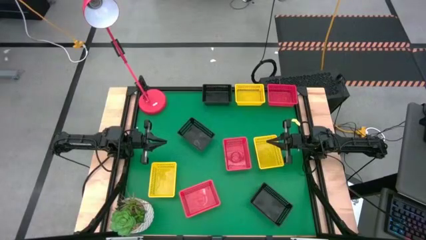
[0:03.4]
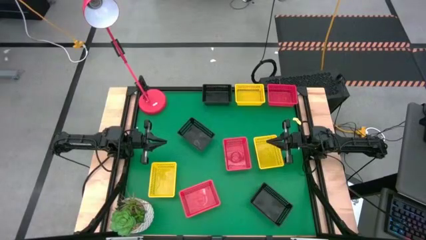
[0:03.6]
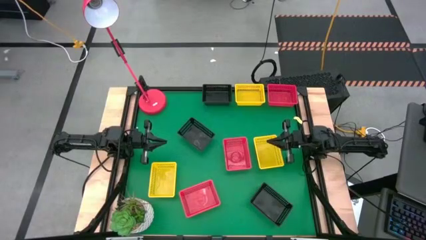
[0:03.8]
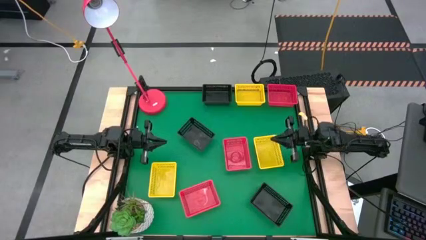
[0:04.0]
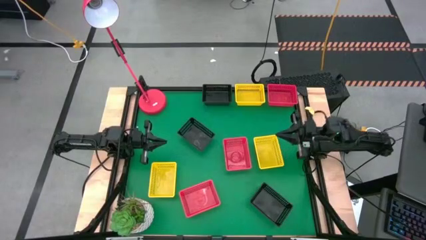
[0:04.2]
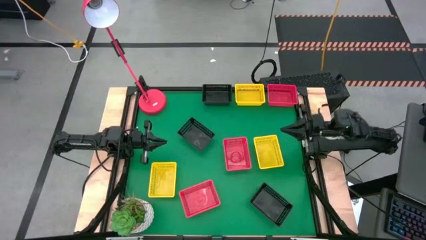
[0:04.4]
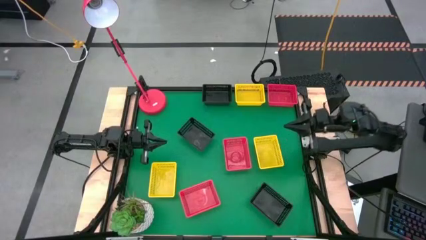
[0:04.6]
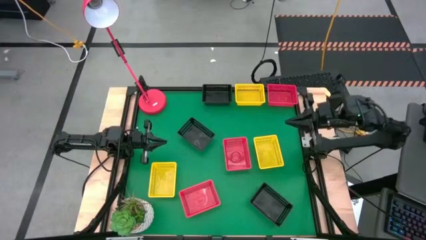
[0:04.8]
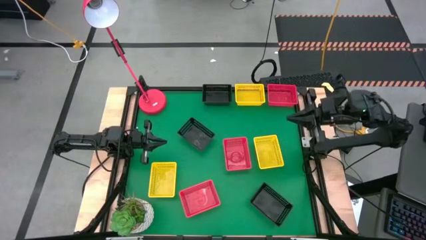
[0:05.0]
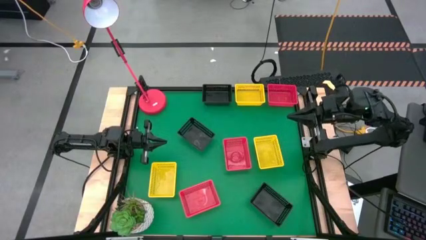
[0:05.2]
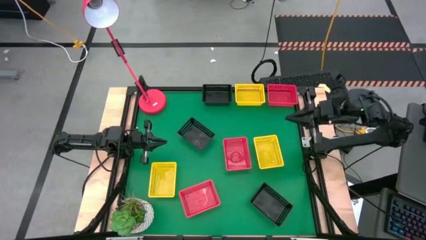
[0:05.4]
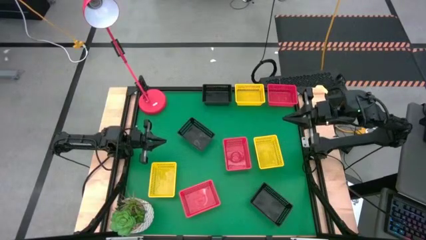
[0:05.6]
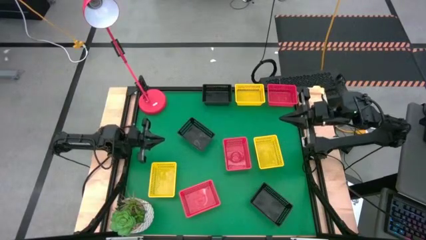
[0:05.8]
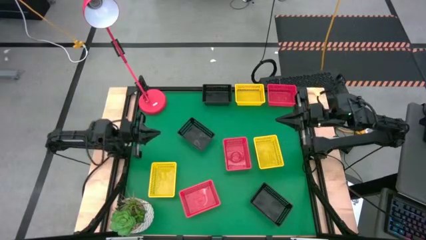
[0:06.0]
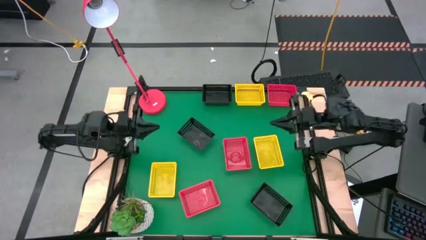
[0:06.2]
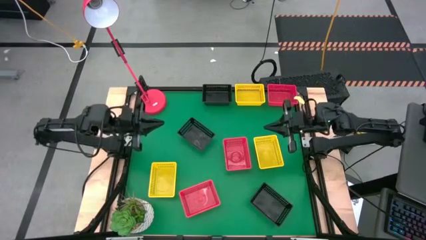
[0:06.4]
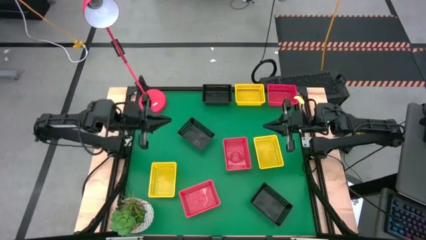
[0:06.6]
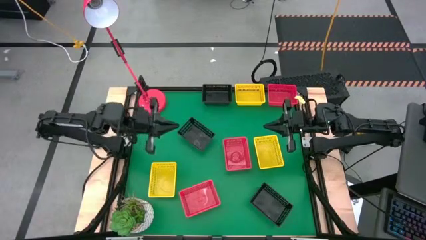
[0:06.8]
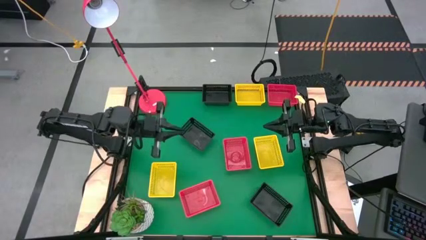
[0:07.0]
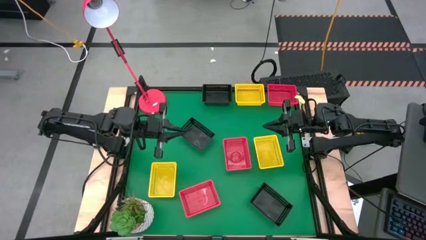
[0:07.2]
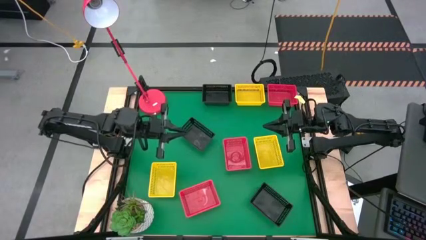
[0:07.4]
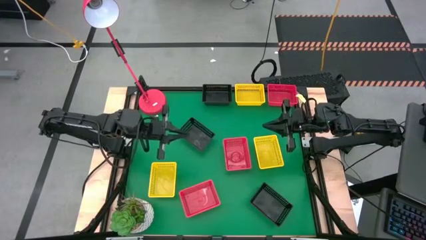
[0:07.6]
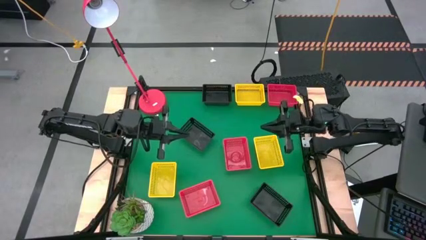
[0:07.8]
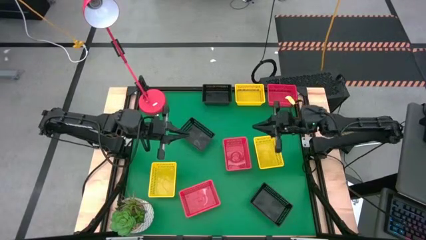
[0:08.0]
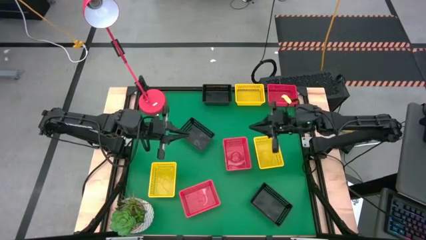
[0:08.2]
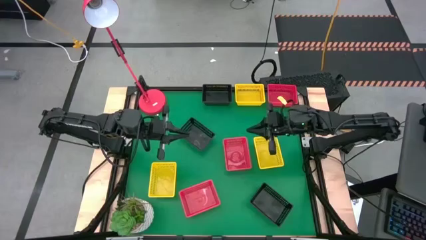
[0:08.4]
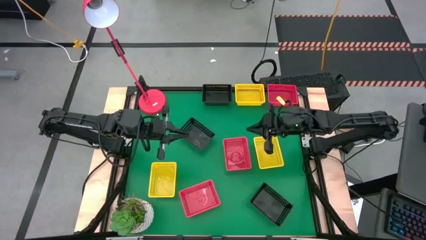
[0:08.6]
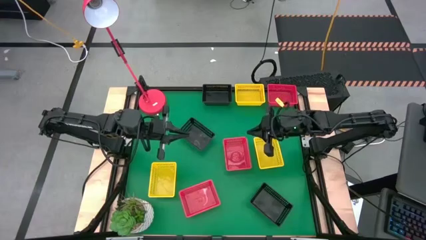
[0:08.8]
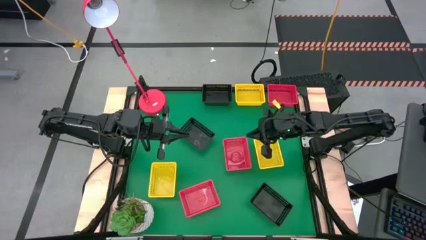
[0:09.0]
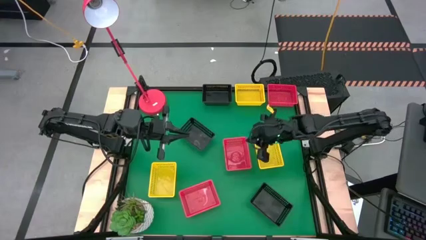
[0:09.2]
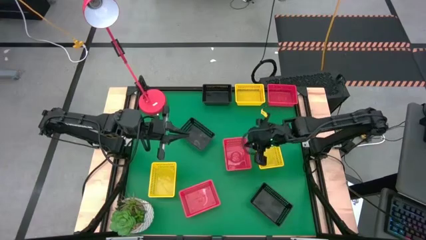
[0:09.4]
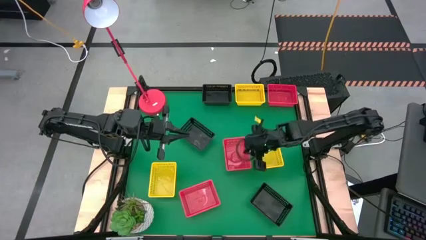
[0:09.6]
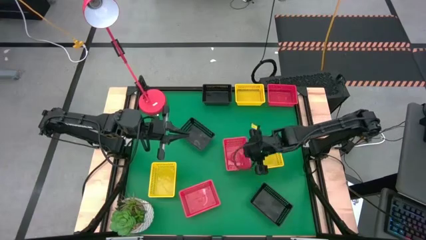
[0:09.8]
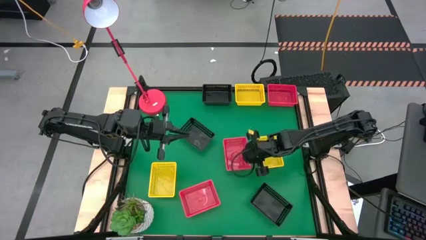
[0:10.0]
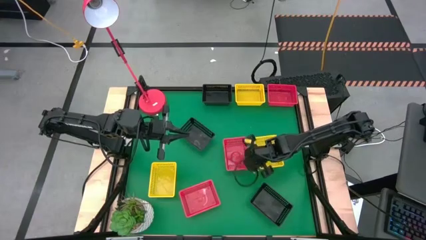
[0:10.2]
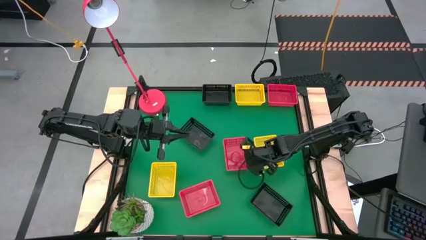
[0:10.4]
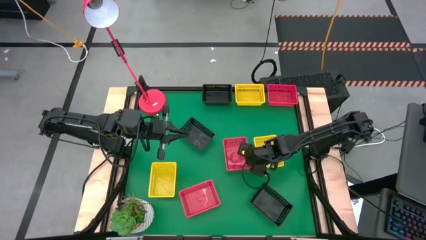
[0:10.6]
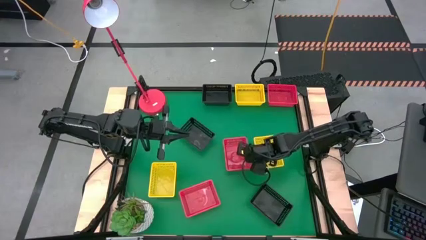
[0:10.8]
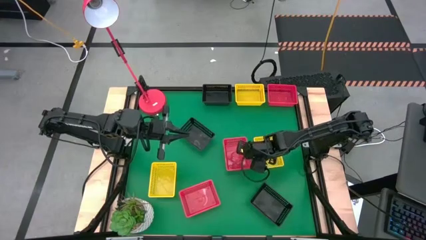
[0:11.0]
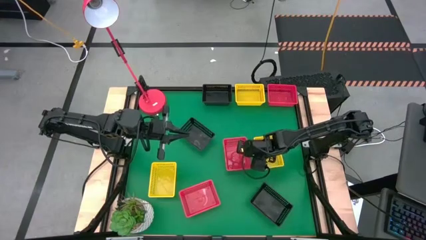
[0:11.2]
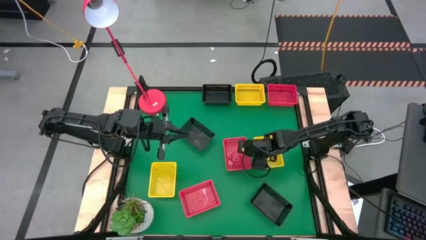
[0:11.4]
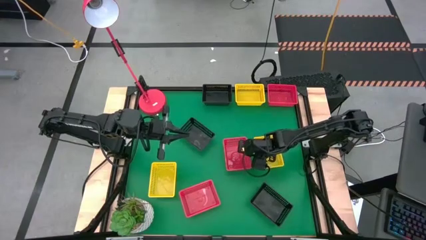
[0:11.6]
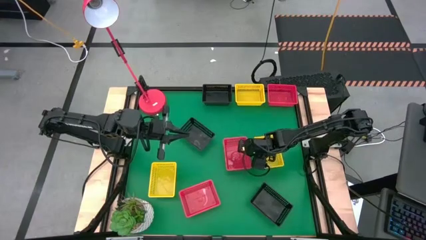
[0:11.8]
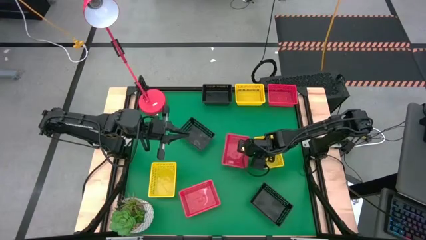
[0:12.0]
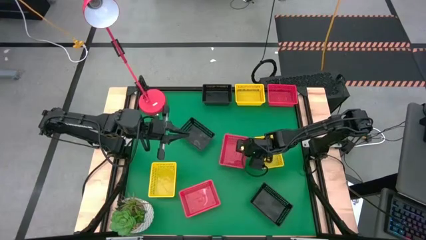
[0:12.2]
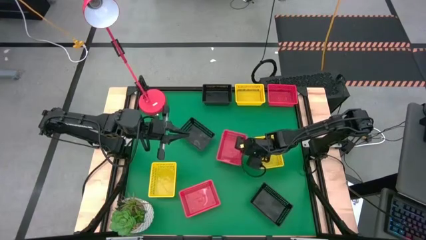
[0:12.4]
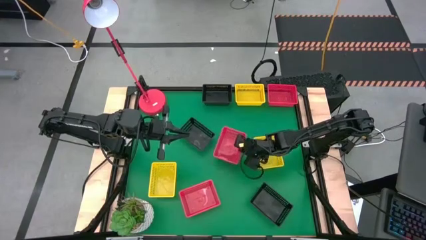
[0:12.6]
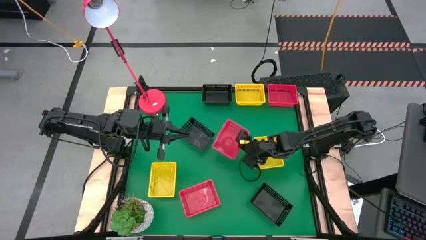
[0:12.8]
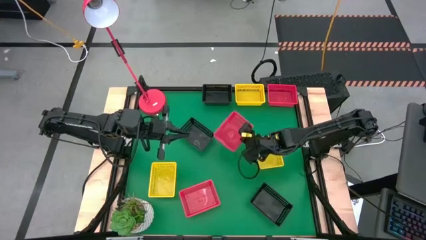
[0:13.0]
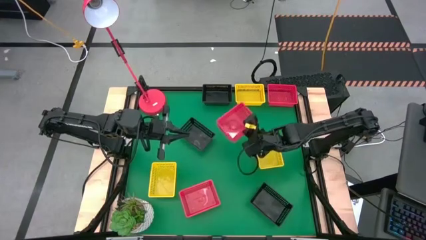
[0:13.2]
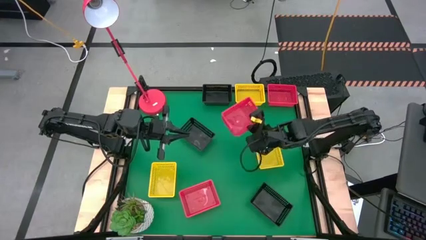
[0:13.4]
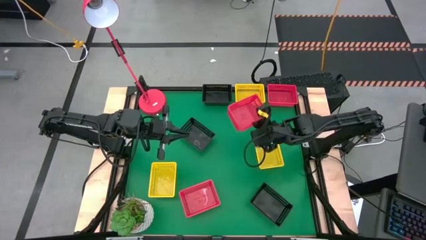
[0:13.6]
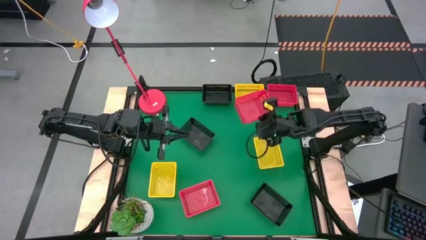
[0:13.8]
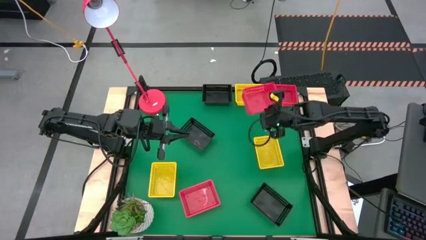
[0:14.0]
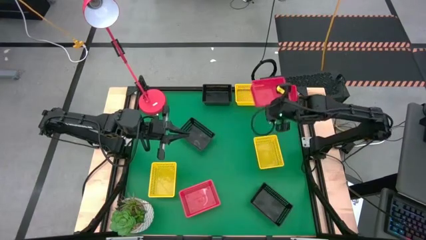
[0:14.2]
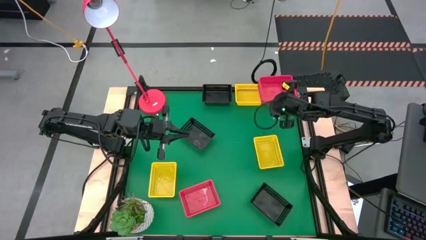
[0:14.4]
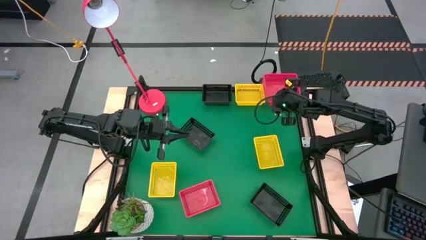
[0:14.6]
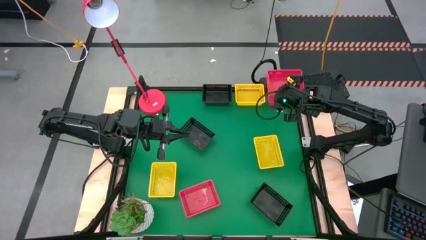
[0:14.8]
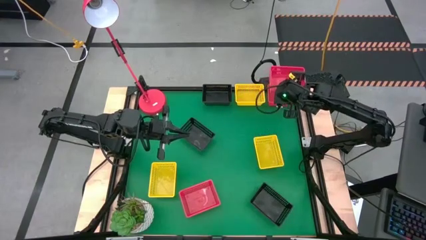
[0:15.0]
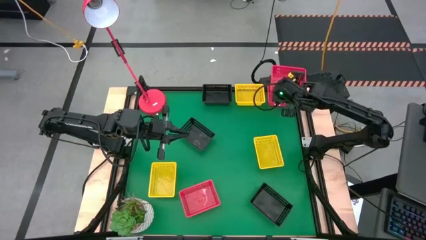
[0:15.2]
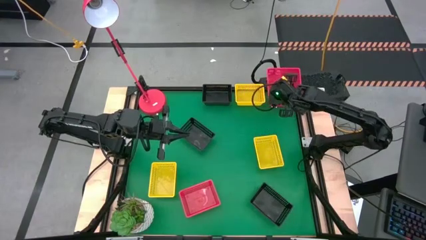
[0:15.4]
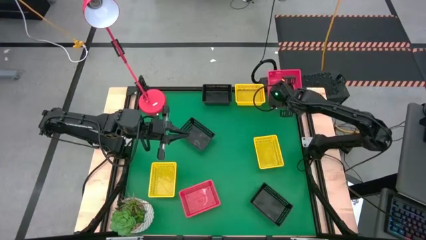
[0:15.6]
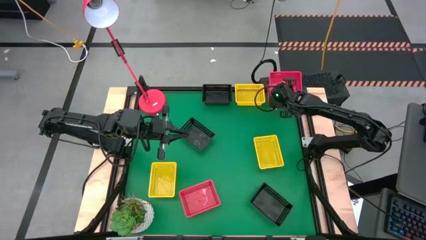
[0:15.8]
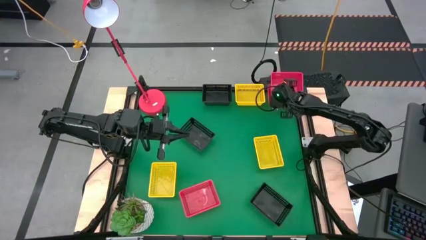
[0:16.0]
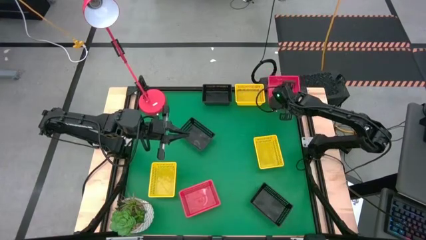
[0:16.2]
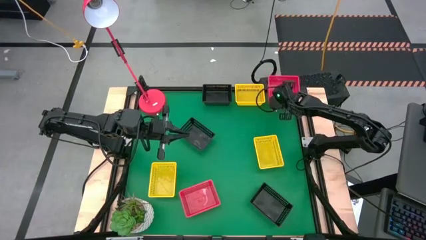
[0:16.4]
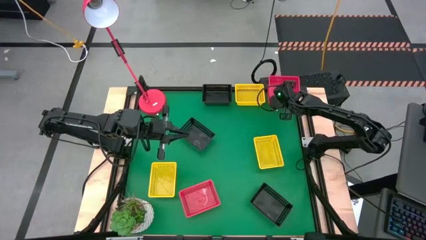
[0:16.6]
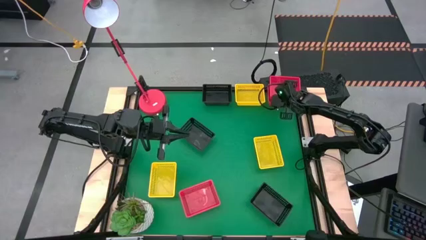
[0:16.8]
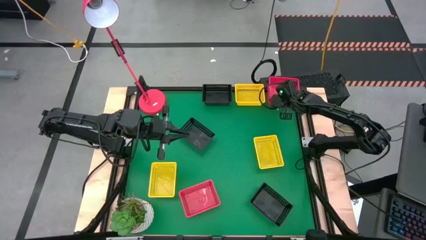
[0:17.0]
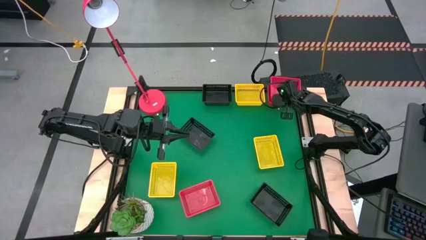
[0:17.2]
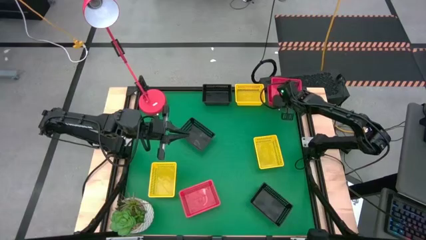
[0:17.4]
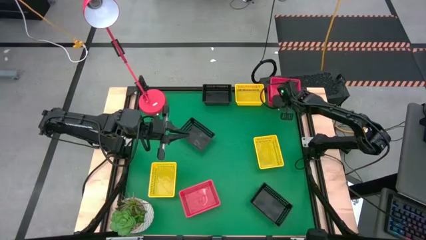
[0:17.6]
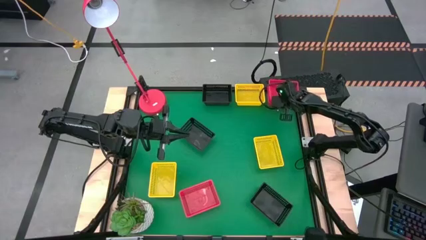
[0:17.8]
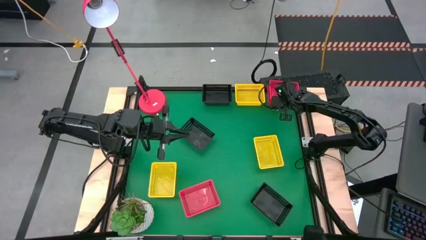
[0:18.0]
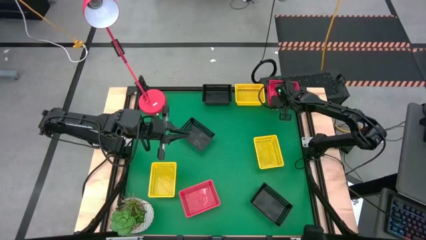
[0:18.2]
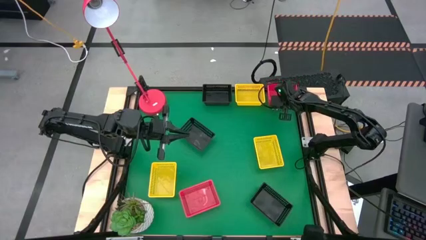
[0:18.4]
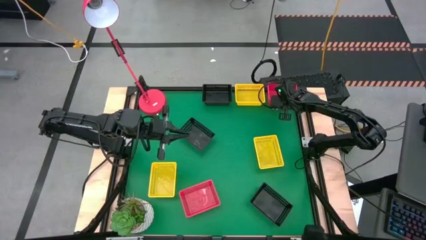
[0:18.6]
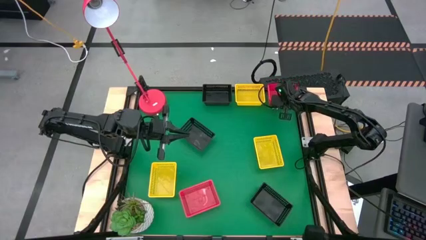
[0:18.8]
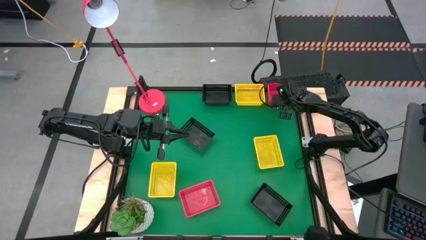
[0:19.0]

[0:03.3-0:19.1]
Stack the middle red bin on the top red bin
